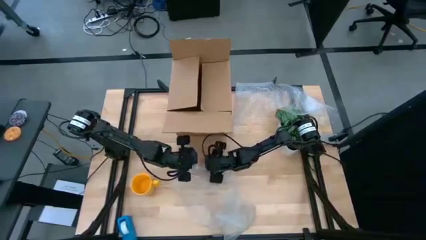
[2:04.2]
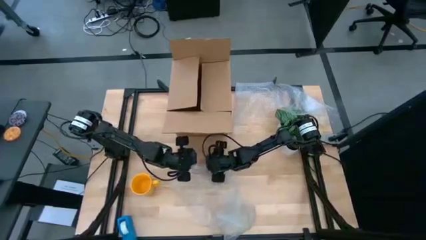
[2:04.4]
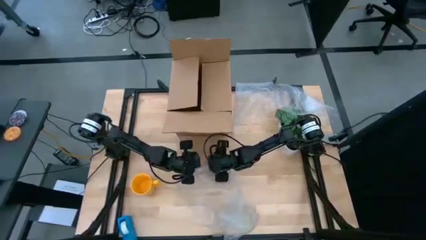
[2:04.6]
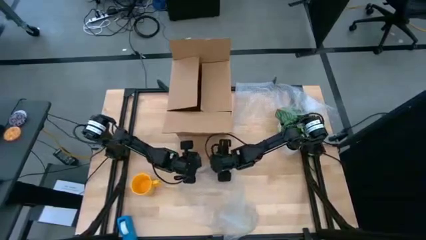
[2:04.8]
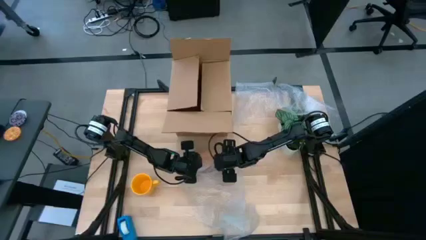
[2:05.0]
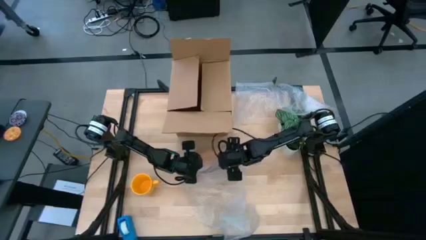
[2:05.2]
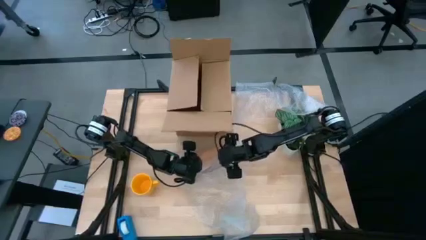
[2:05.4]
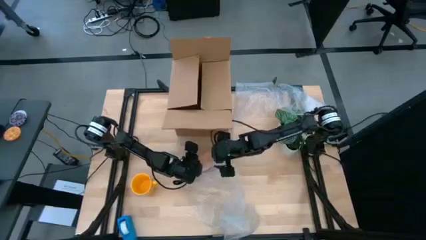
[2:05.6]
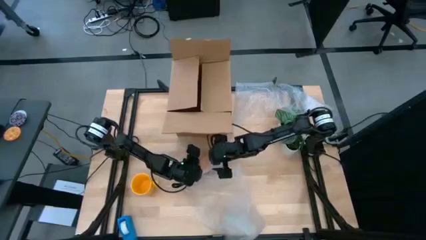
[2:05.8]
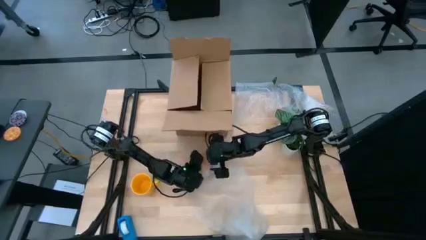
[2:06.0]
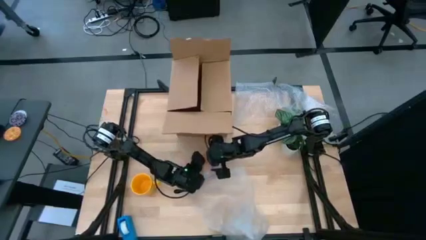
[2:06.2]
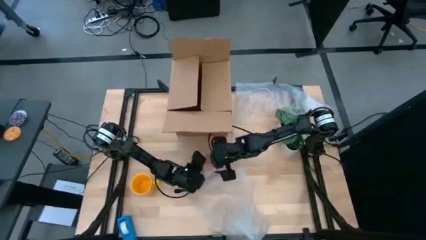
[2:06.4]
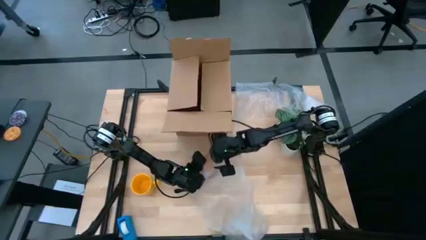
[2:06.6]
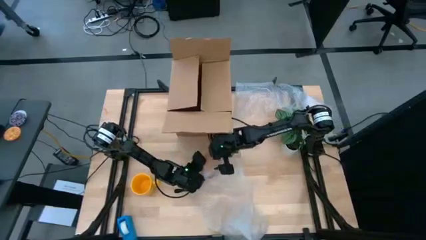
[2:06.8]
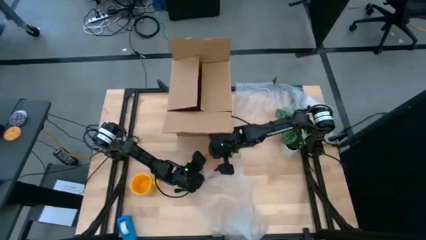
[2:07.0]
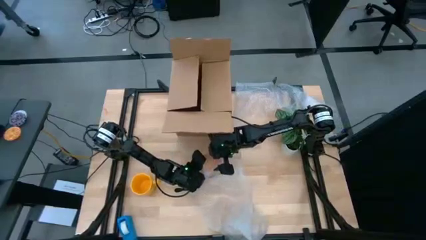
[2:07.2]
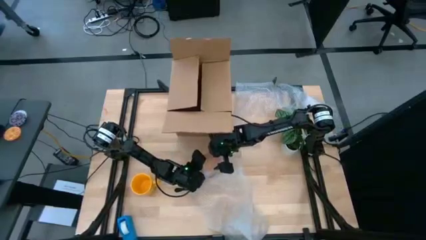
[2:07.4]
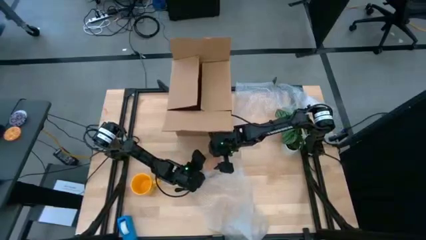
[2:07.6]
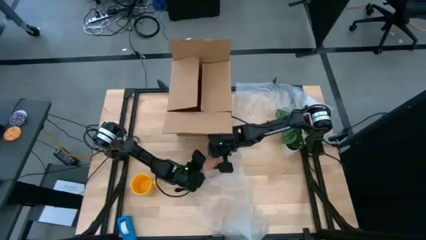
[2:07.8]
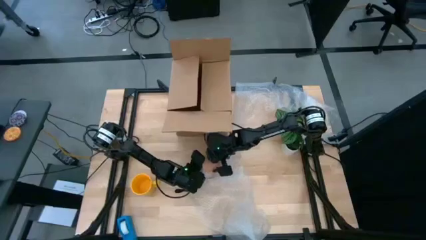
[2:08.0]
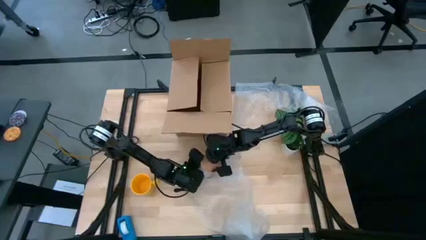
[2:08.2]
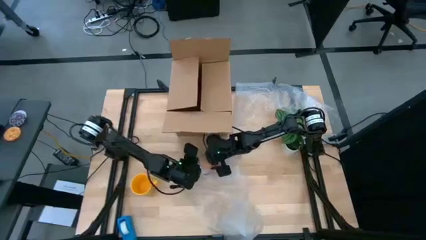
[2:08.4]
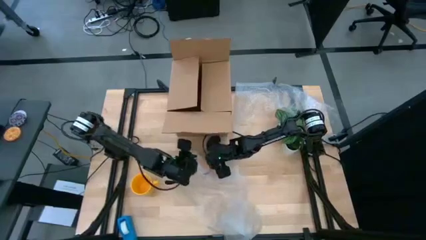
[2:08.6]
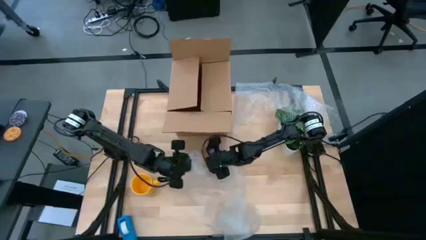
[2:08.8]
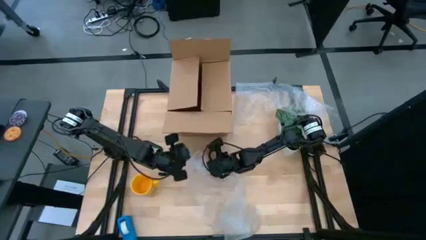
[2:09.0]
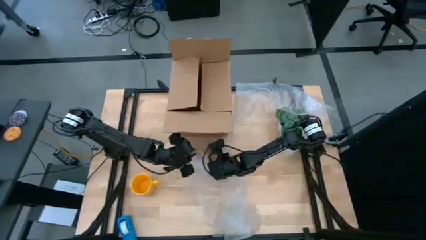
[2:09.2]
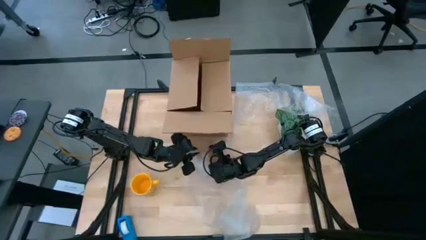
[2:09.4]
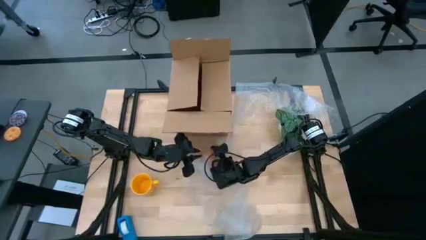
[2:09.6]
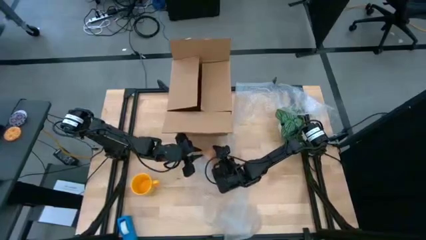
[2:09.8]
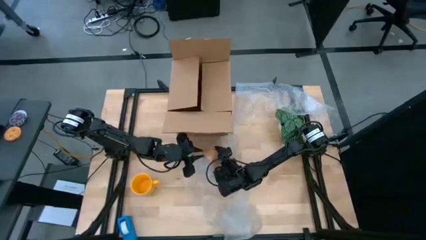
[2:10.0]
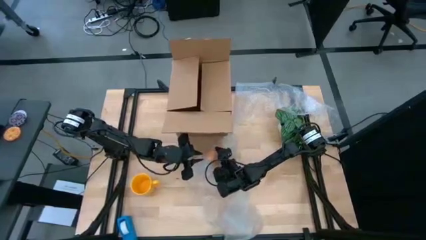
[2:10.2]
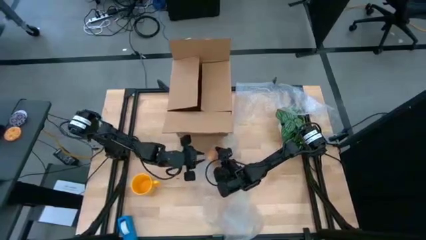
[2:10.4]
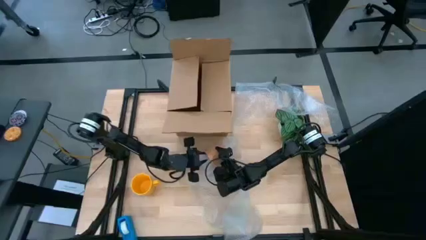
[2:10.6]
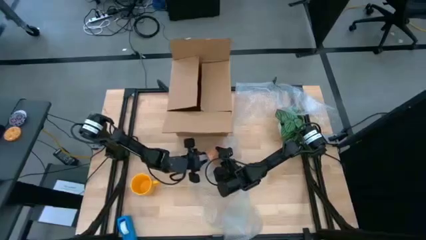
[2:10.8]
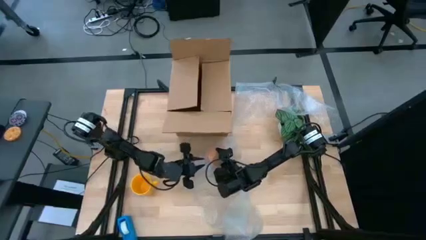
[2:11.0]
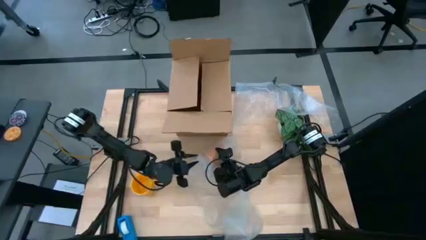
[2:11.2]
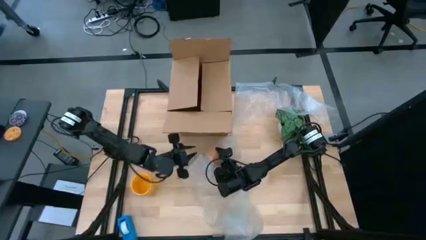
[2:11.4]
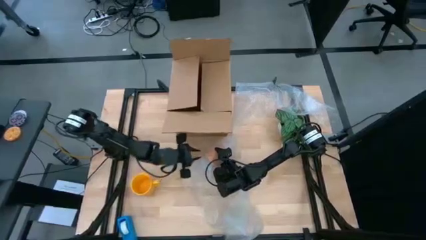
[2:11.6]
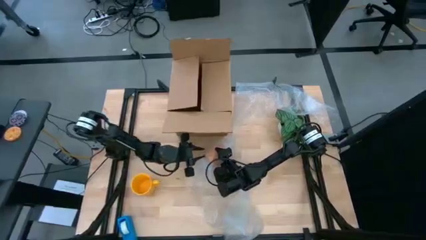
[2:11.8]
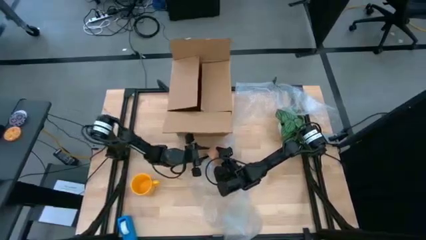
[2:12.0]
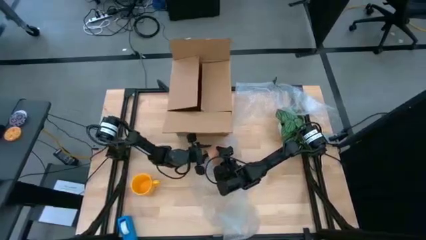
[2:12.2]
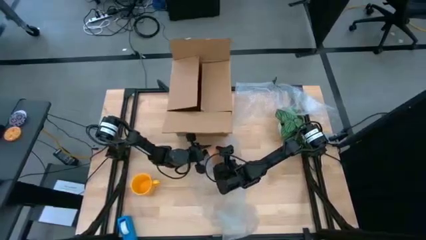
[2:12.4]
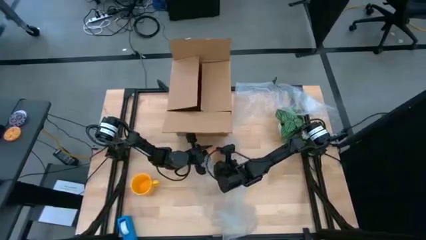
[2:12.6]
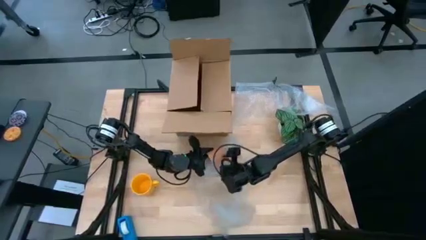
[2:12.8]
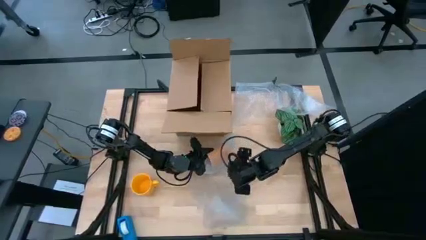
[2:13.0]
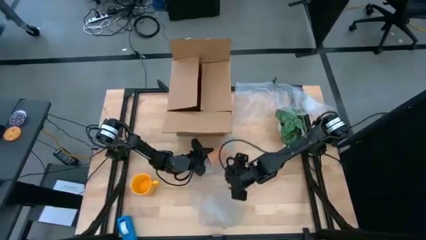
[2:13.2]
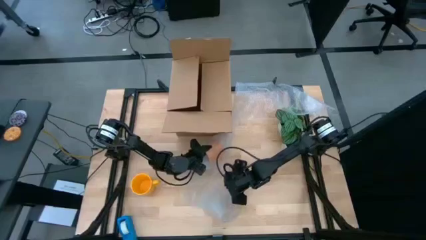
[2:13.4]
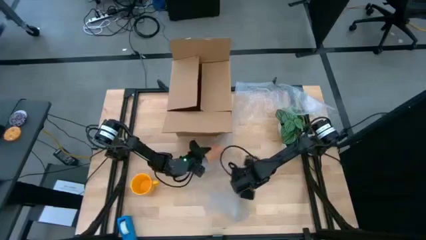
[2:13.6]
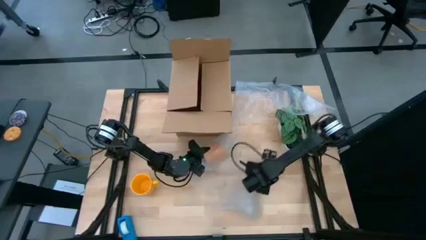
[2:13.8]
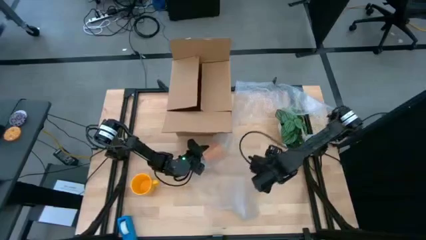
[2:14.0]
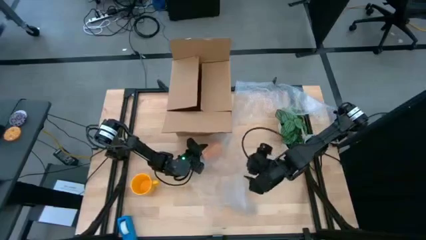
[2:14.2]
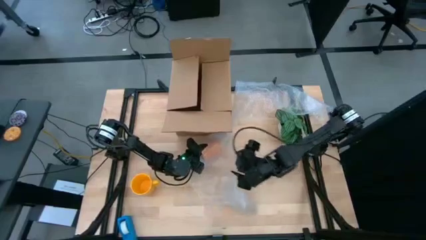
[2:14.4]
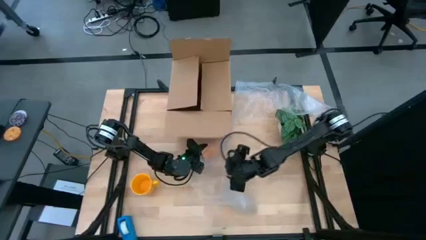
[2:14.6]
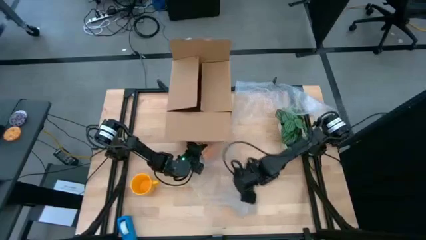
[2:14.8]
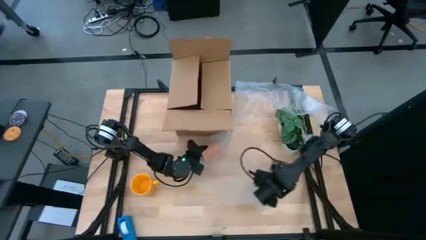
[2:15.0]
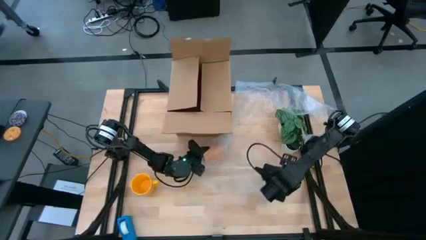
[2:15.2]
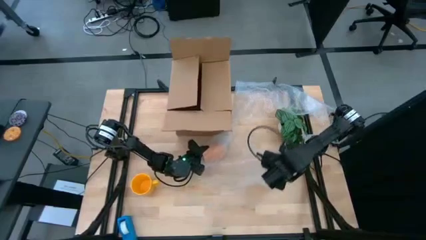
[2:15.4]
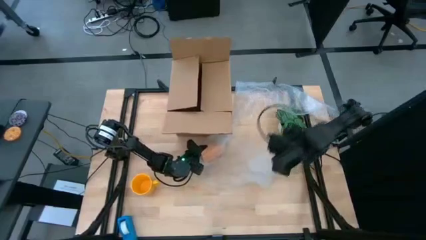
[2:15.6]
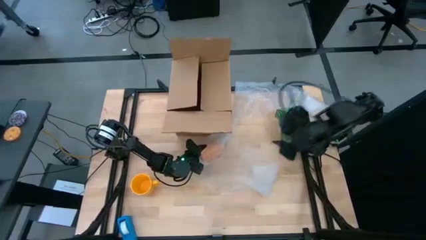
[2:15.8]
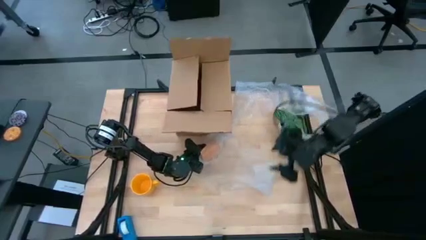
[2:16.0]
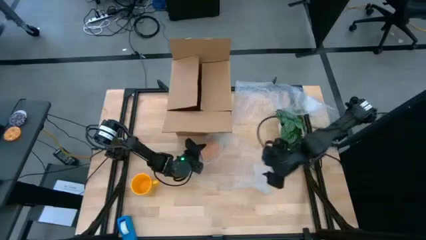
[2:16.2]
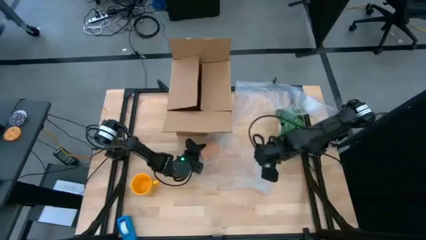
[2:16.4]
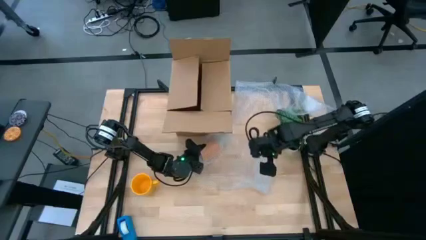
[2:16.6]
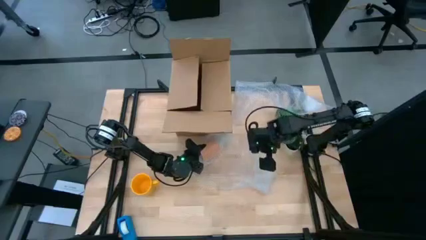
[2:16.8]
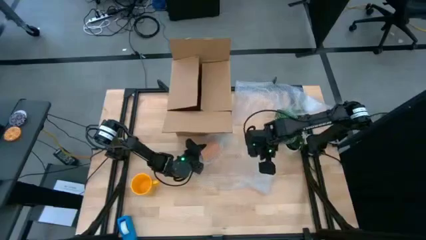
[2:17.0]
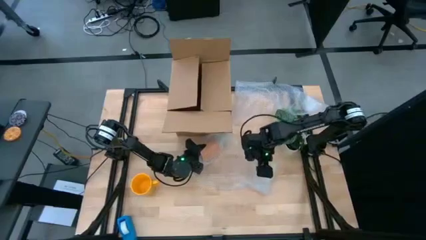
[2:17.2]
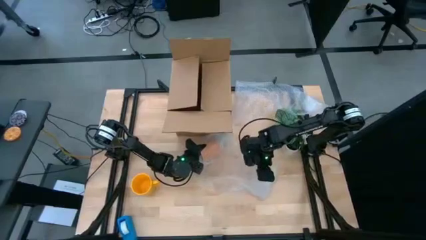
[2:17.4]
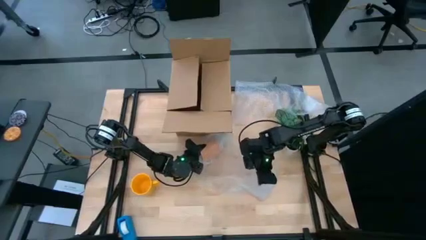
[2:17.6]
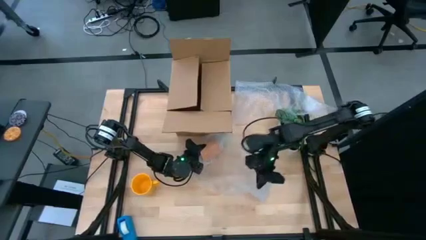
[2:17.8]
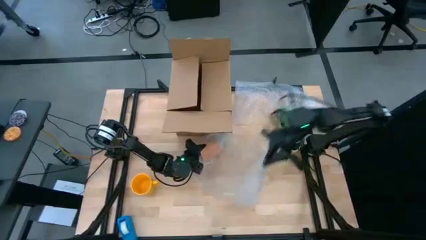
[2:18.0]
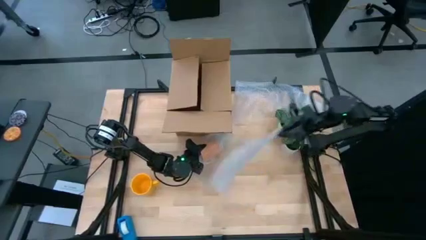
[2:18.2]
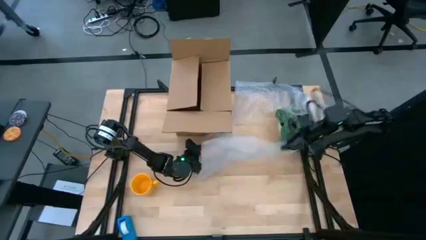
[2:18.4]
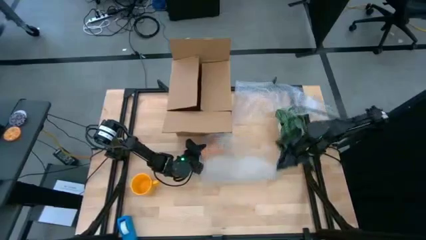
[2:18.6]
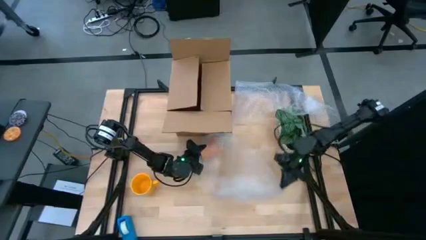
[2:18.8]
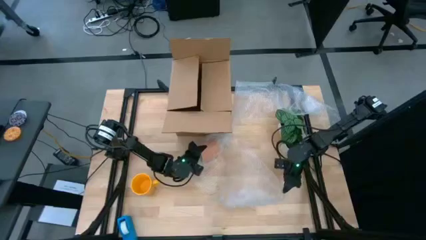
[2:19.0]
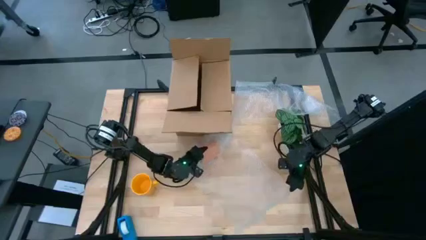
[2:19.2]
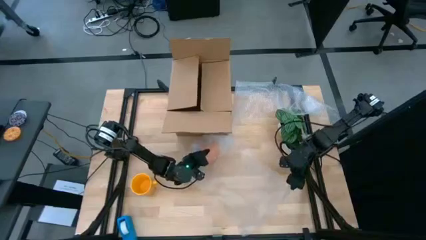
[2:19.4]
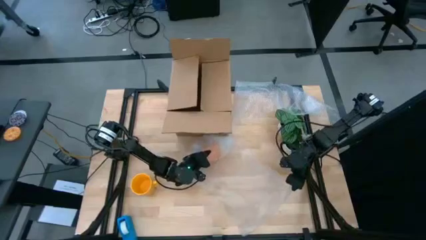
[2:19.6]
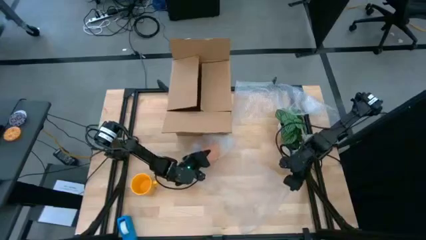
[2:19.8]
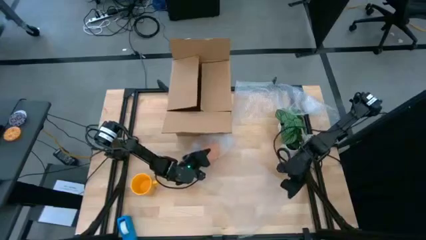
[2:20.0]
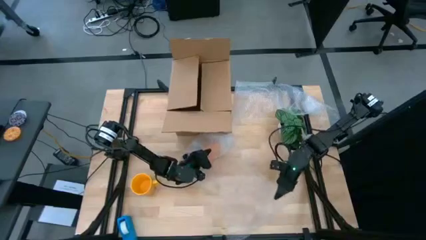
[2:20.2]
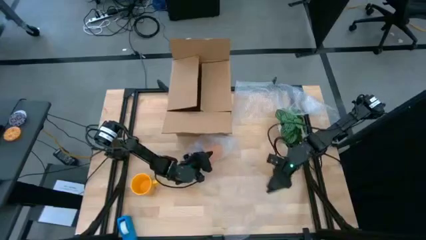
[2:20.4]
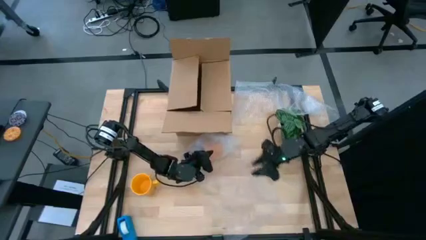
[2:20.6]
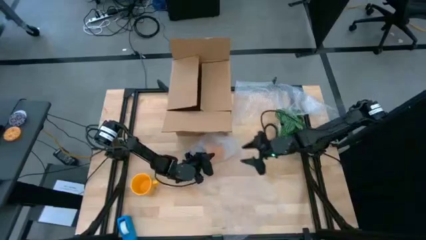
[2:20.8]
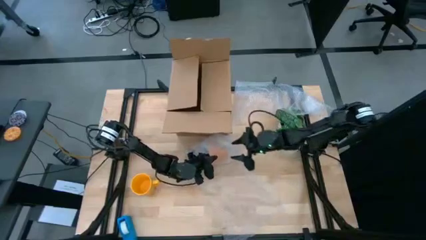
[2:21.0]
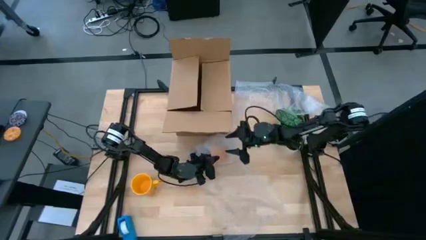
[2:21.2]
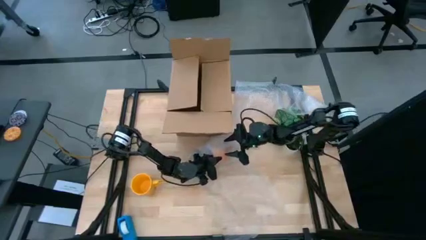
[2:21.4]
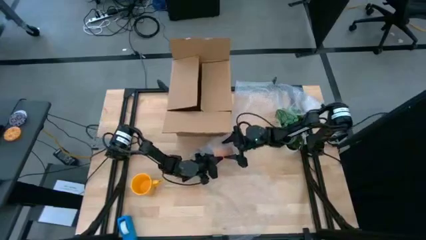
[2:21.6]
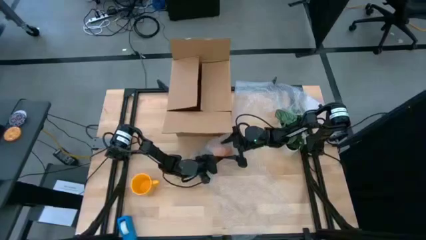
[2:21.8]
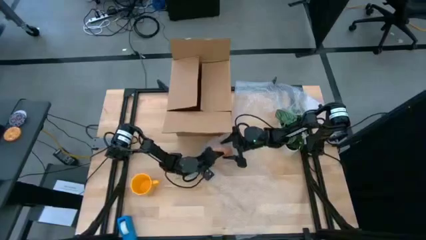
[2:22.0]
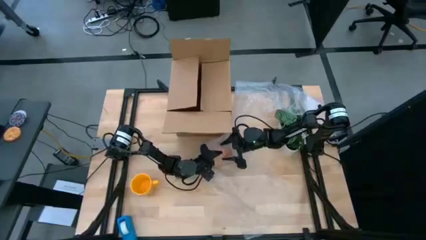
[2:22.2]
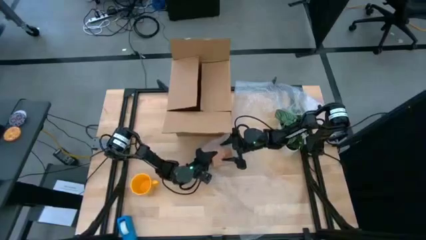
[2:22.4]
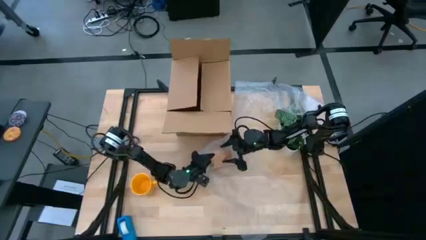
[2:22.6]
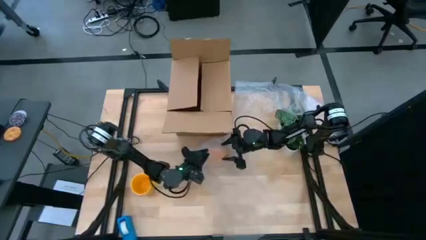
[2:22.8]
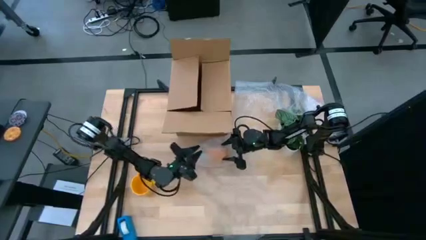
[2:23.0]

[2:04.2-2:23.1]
Task: wrap mug
Wrap the orange cup with the bubble wrap
